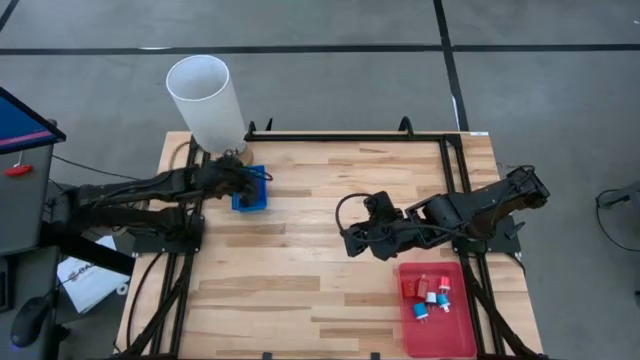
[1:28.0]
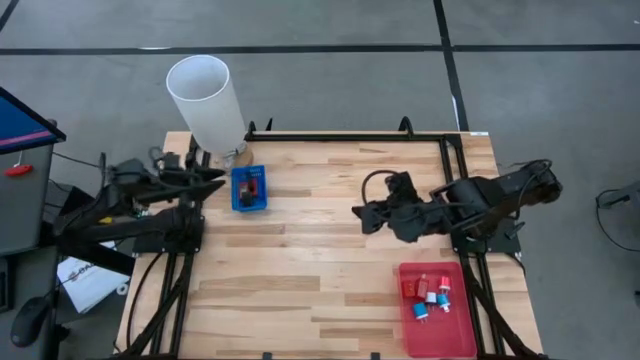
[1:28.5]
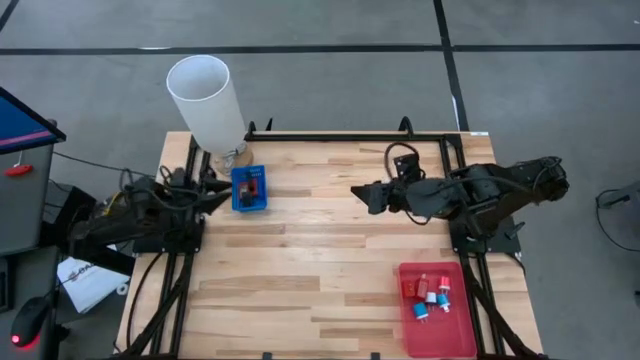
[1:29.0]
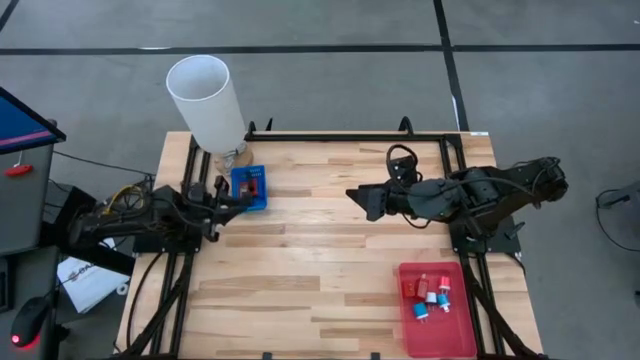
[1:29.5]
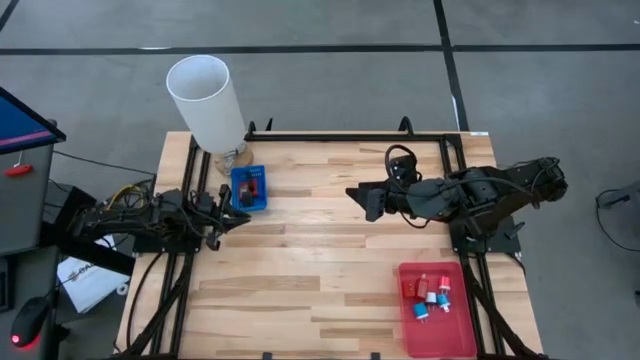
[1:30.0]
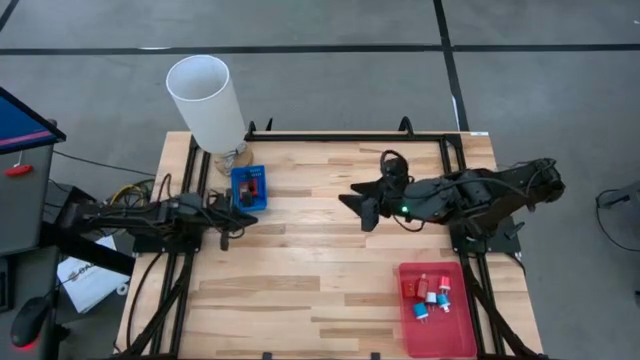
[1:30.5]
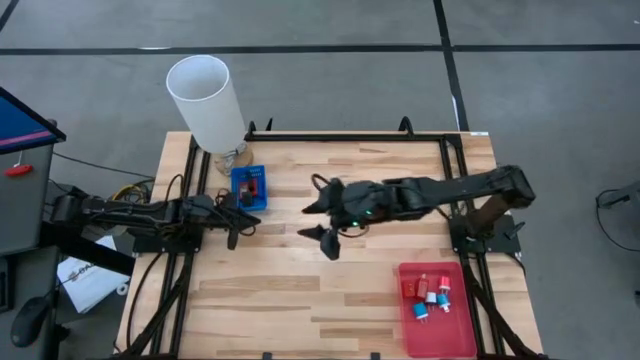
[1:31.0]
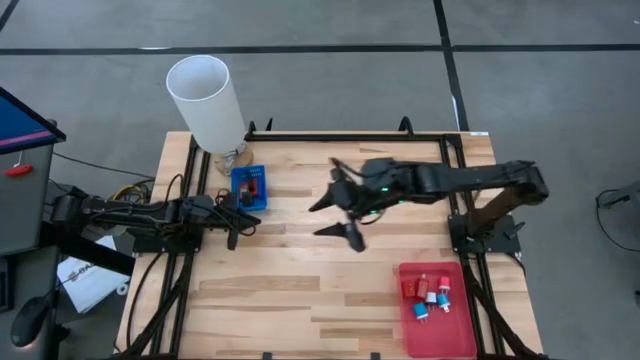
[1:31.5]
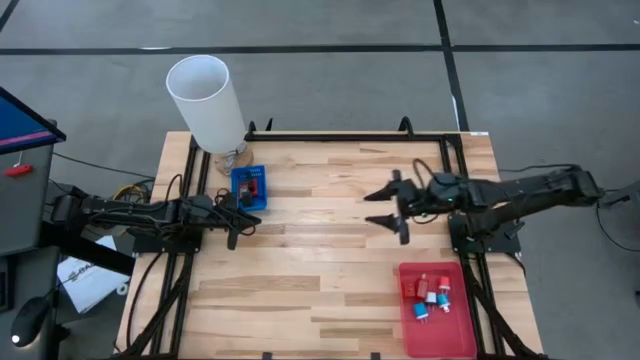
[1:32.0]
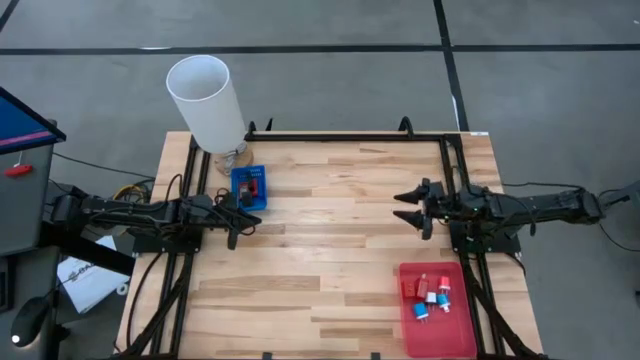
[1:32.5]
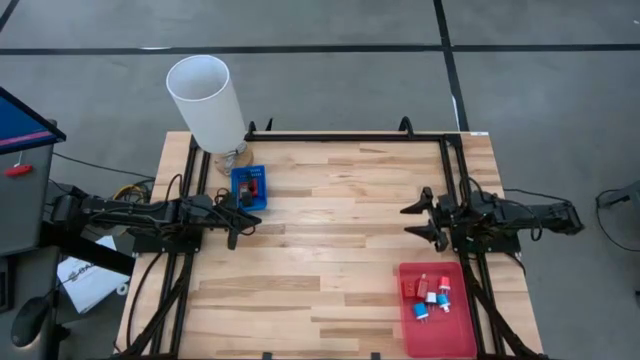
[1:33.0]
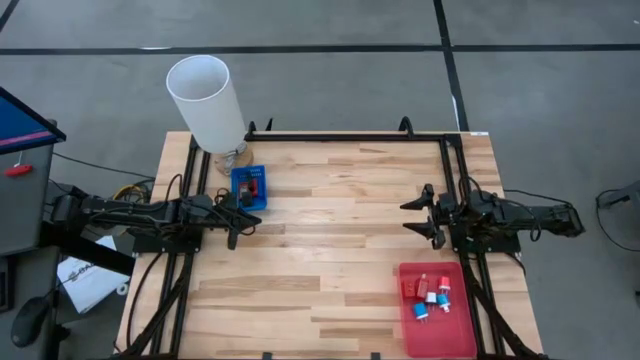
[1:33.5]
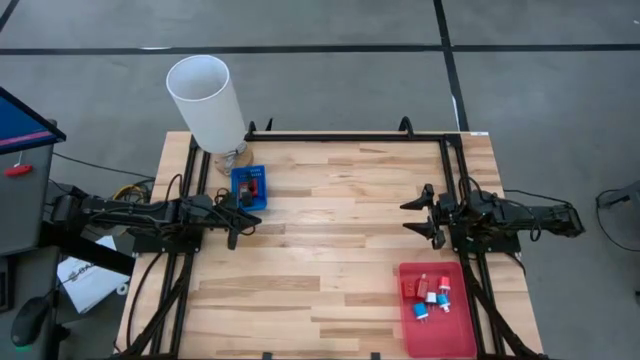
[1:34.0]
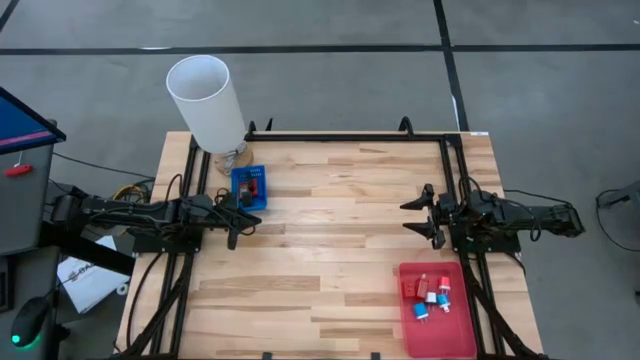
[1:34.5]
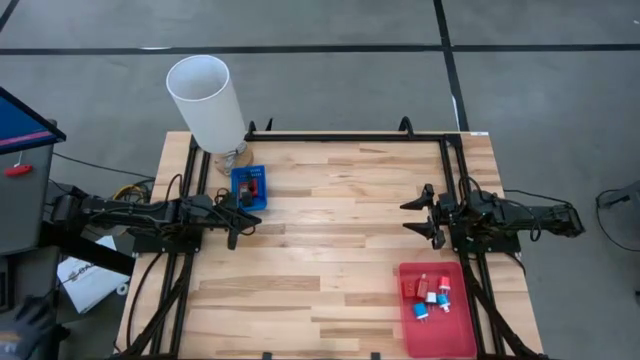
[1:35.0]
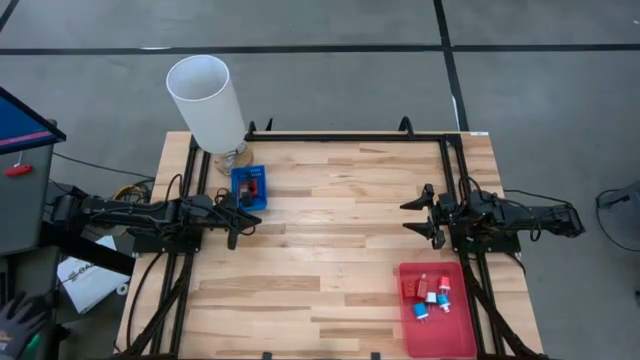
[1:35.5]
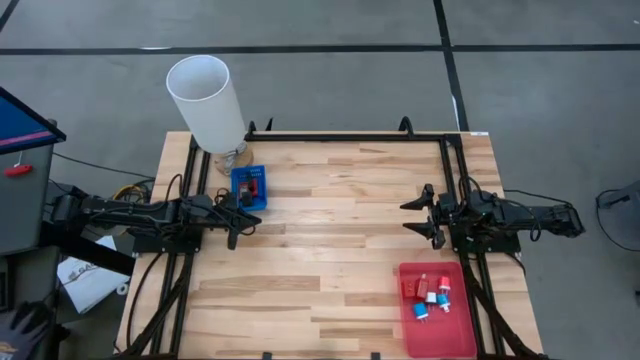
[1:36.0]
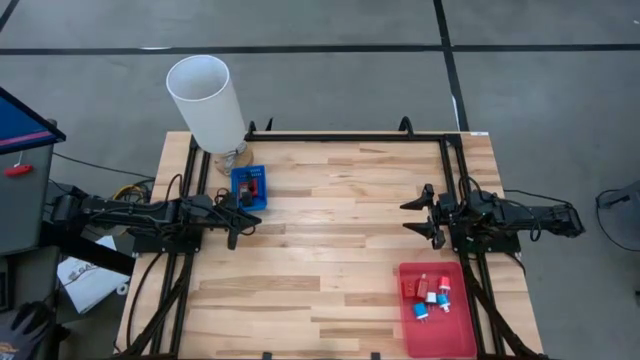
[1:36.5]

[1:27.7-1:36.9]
Task: Pick & Place Office items
Return to Home Position

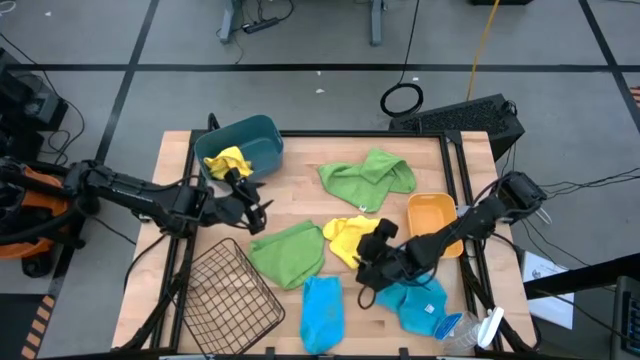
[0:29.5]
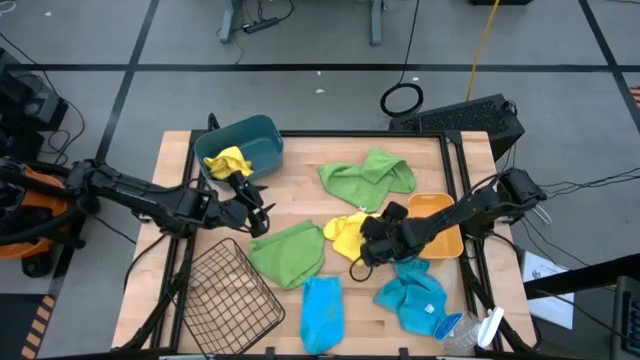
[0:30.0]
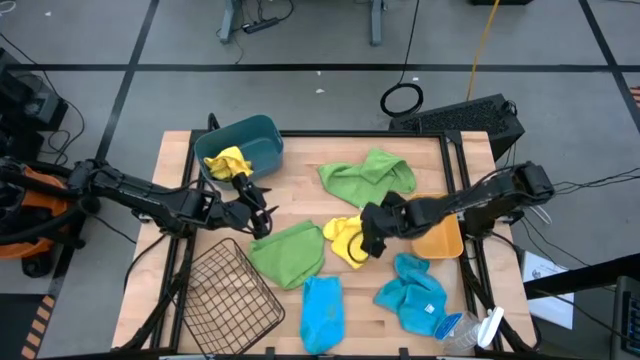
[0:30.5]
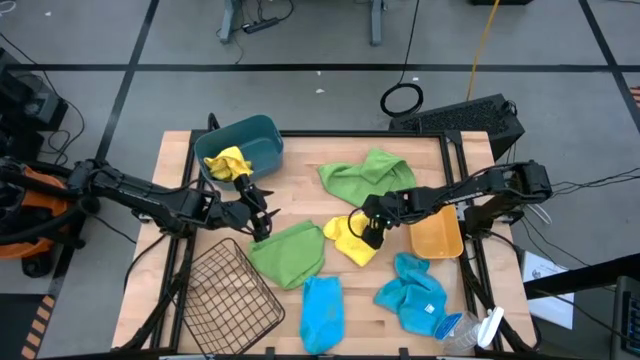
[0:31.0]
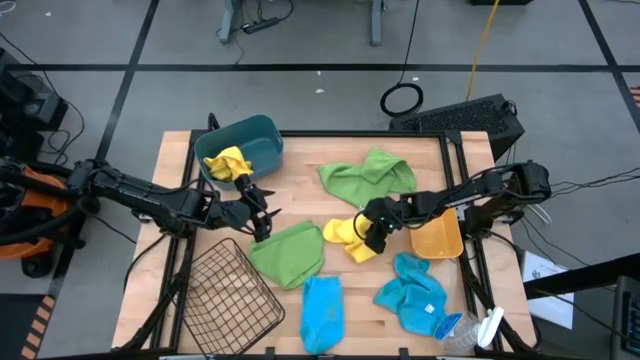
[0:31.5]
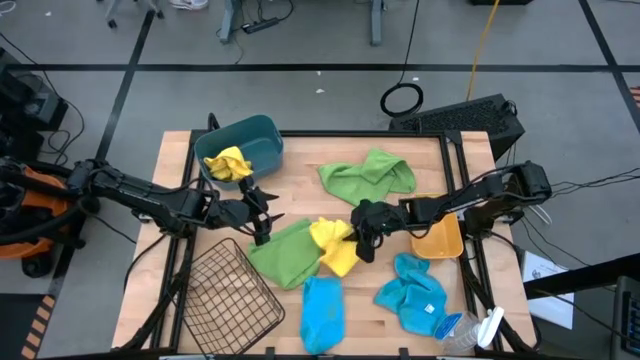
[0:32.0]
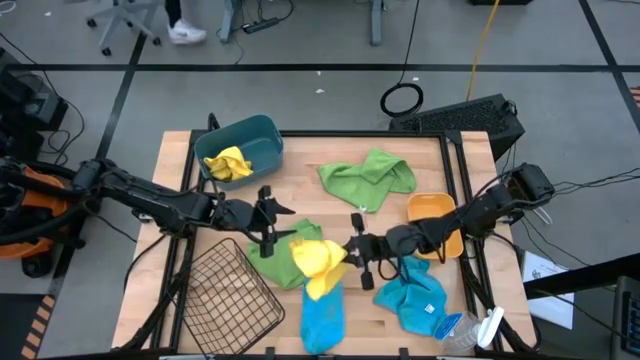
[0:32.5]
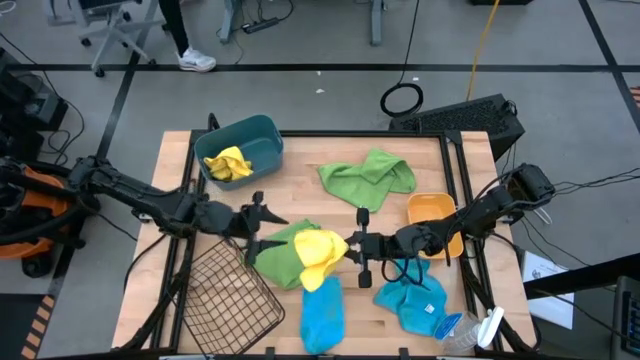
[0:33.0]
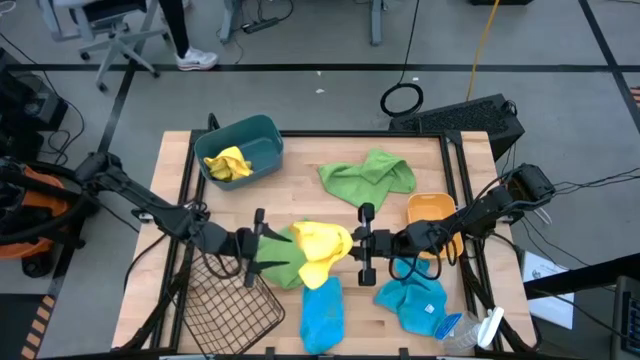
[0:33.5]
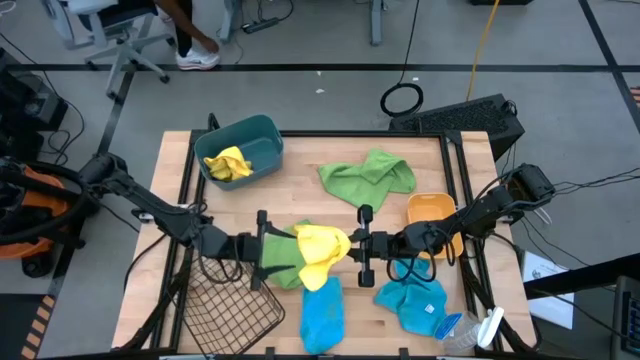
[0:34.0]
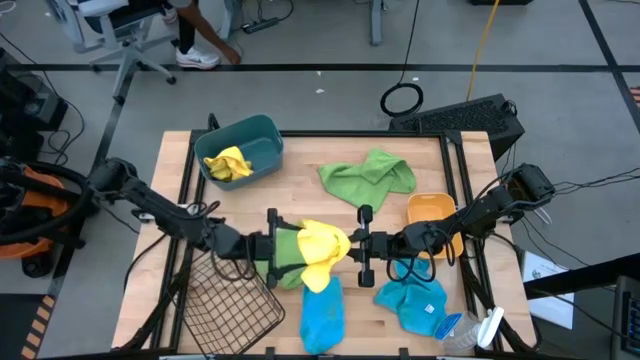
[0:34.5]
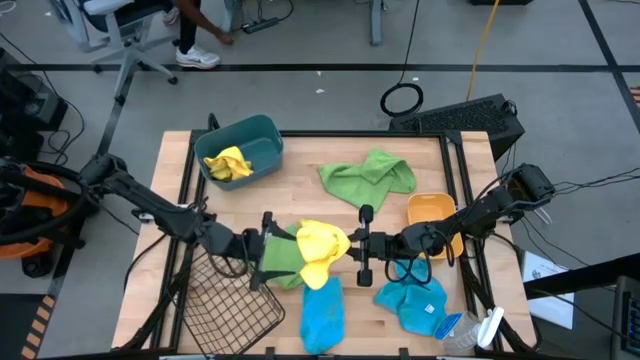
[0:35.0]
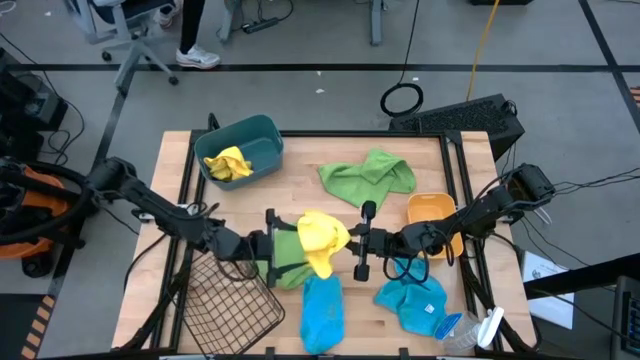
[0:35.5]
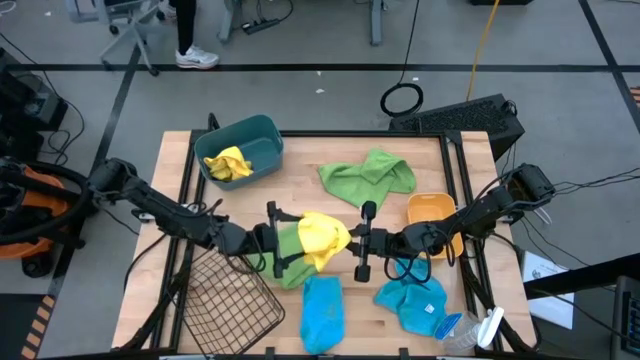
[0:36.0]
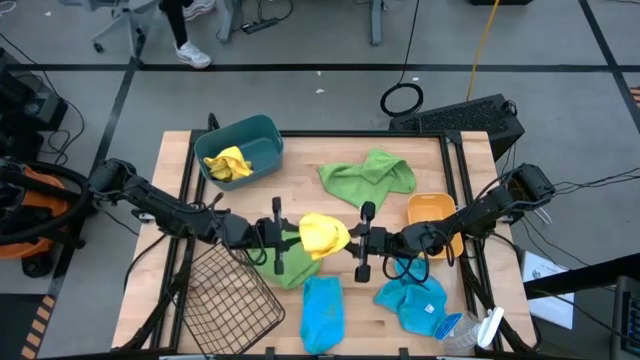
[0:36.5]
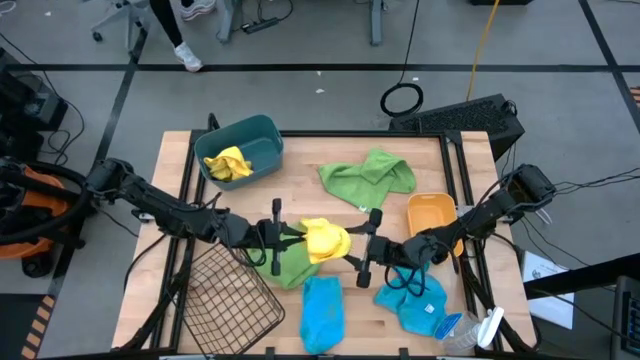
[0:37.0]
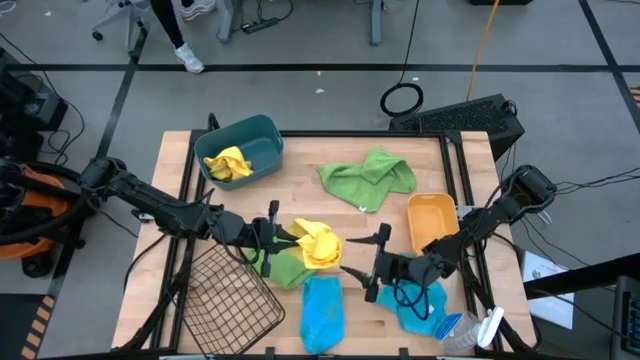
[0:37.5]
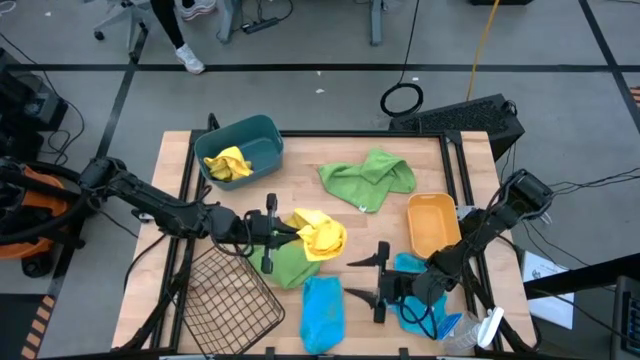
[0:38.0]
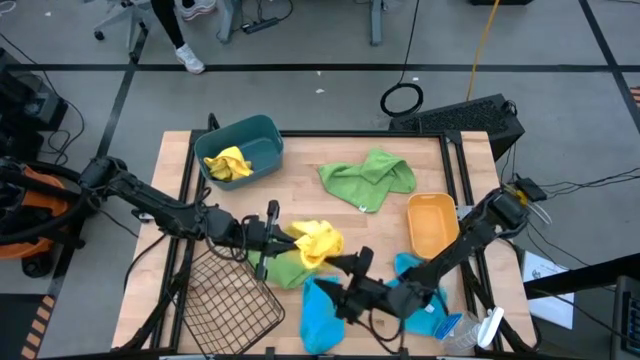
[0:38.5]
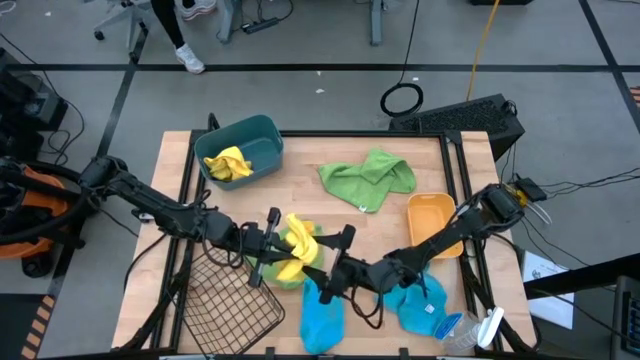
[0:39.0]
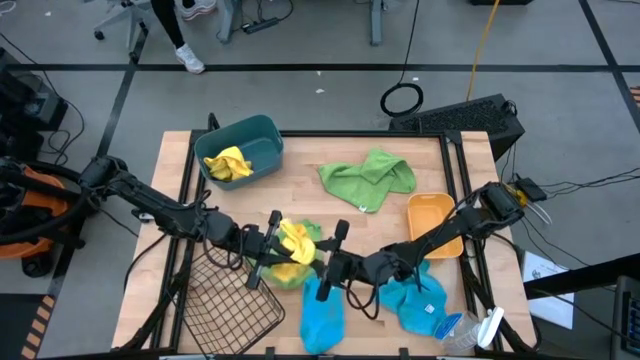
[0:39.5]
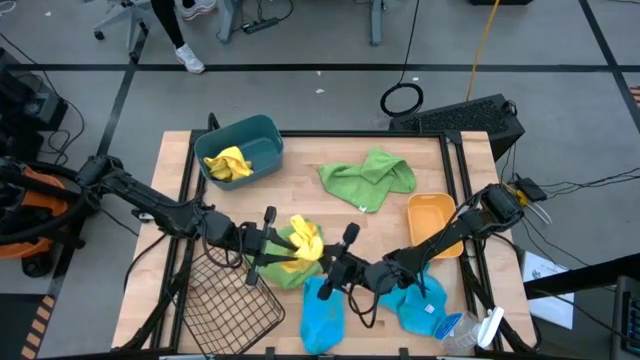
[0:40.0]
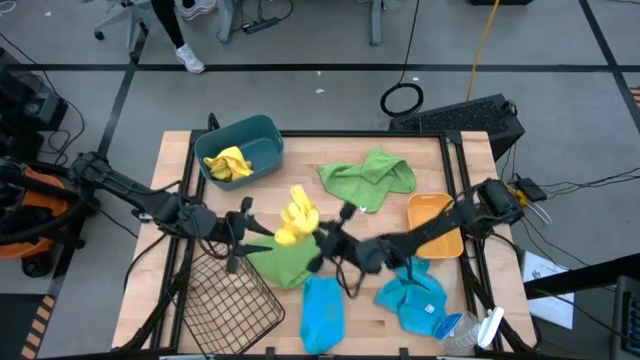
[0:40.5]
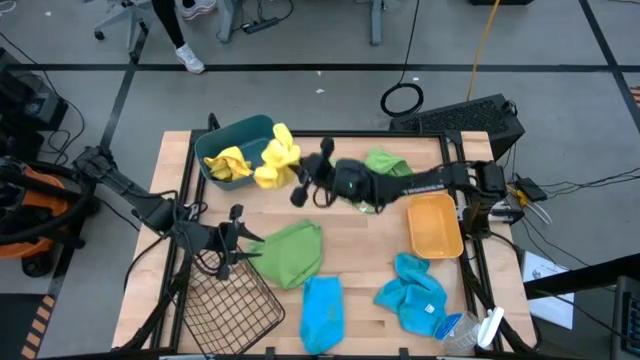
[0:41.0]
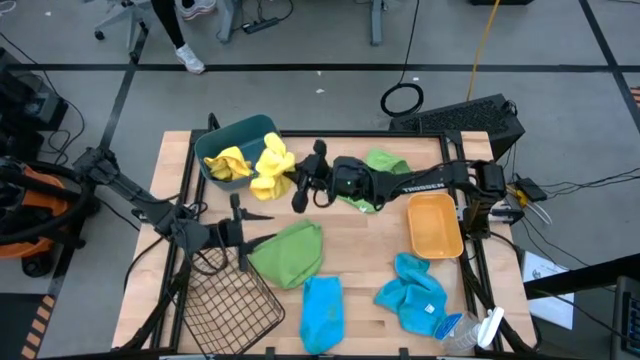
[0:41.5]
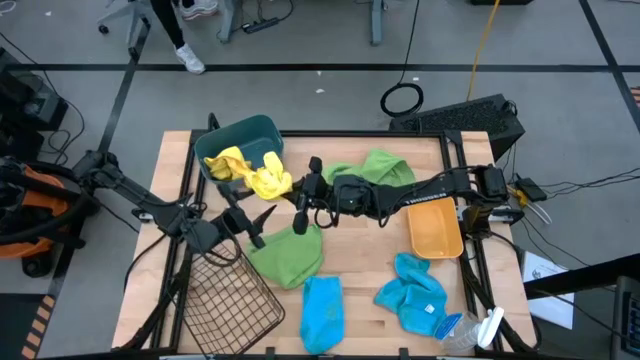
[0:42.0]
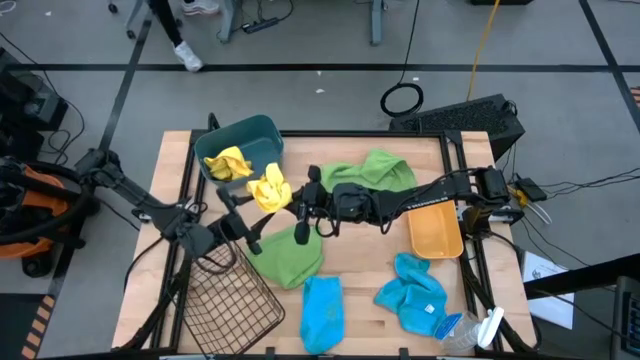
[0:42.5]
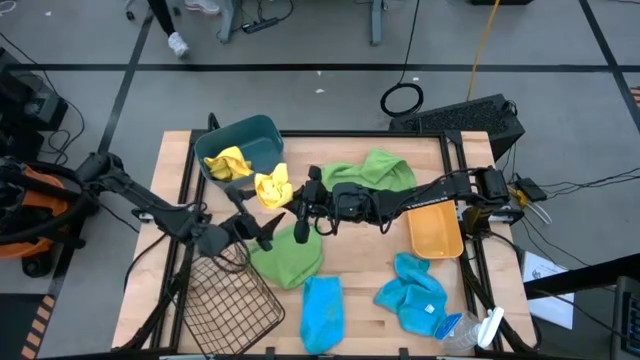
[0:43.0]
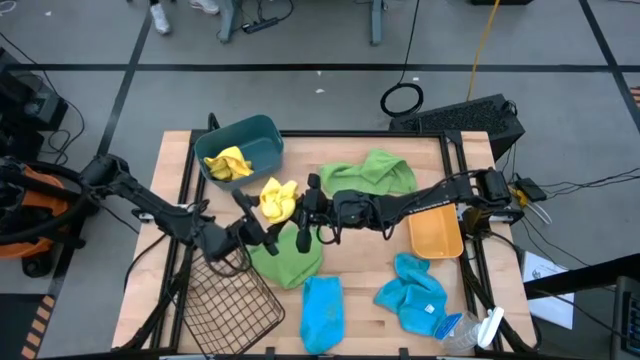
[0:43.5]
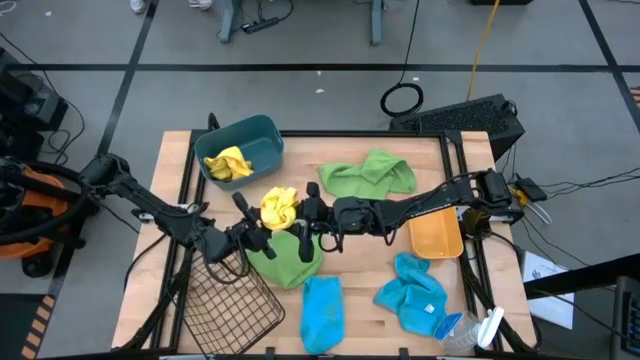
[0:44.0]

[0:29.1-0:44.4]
Task: Sort microfiber towel by color & place in baskets
Roll middle right yellow towel
